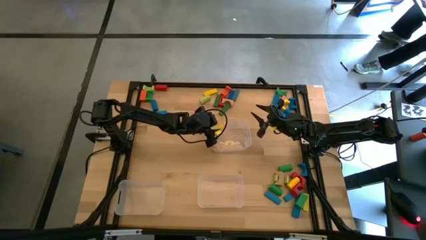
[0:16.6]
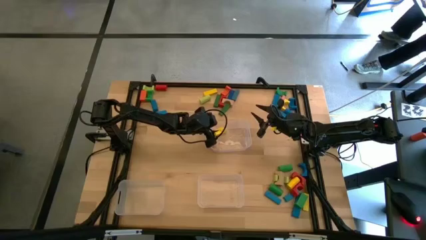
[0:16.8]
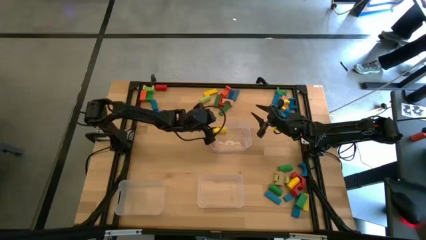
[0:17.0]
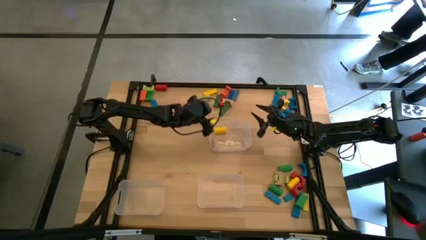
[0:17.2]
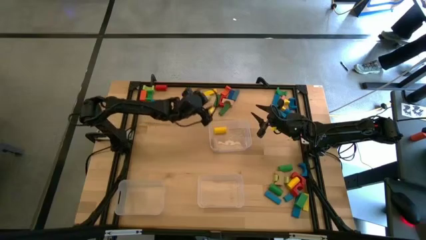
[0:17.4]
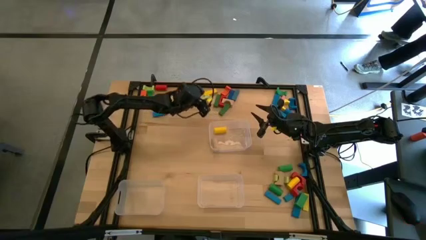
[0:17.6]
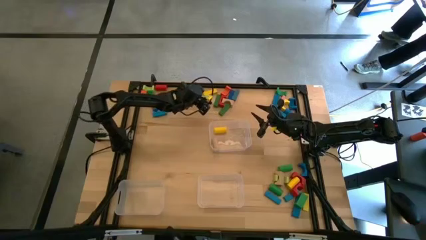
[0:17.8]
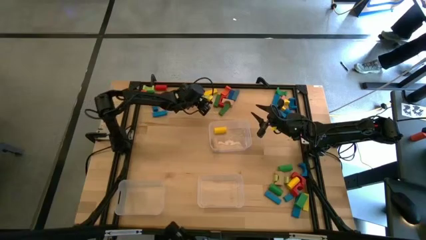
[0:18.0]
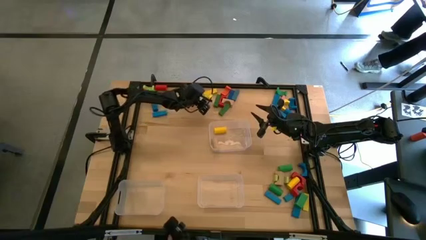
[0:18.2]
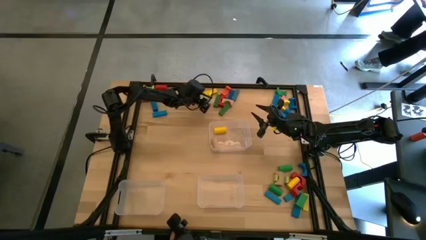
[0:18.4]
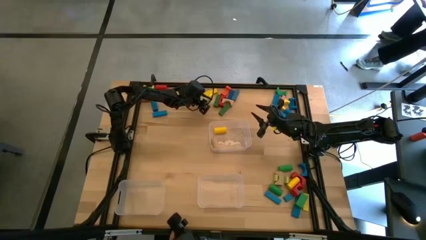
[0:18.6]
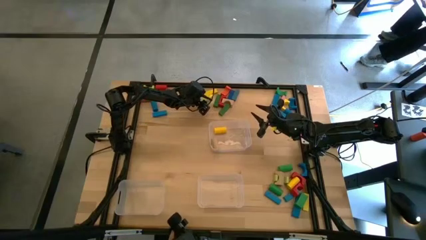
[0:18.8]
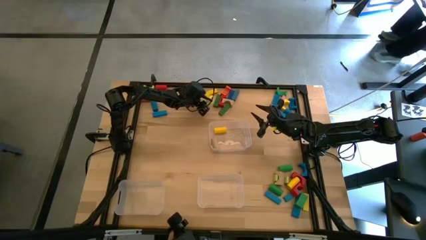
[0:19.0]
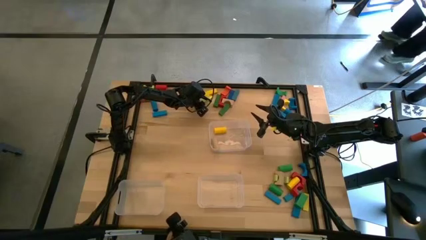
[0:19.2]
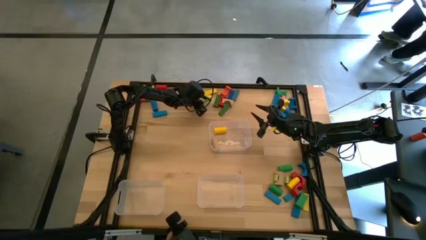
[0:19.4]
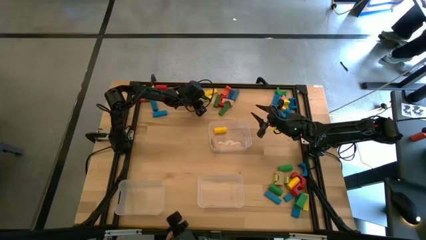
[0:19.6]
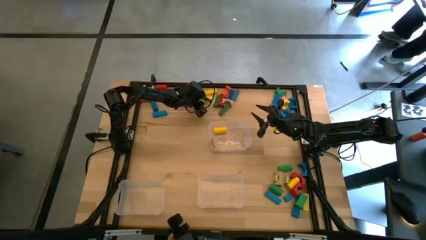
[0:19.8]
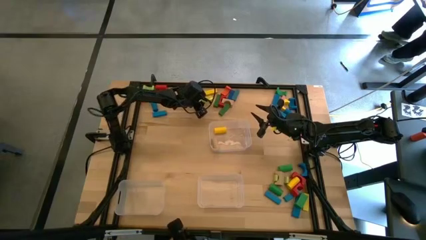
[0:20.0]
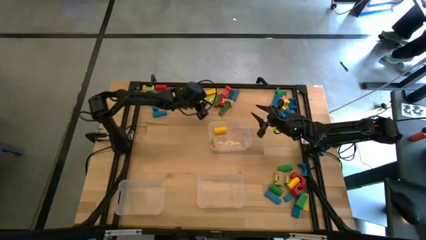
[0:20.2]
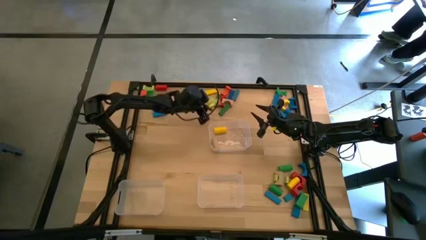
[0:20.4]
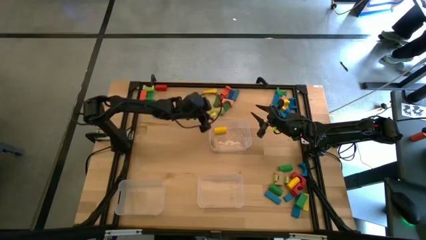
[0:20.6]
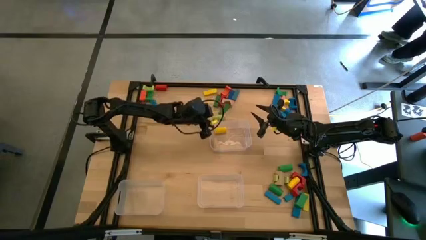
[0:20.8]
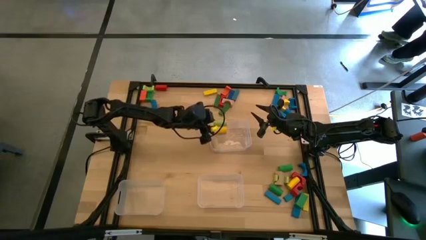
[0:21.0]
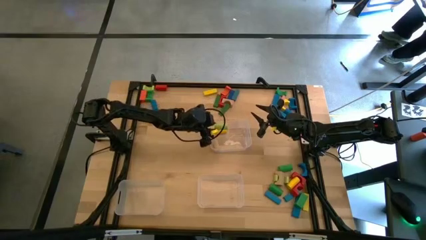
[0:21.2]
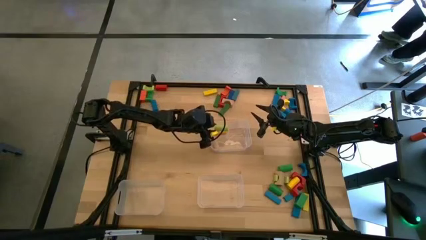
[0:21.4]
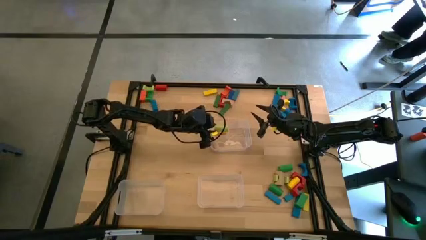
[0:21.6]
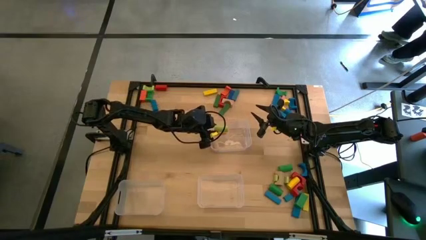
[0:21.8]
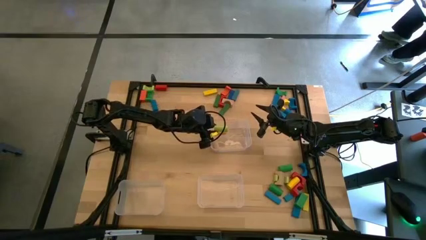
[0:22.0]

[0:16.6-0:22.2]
Task: Sort blocks by size
Put the light green cylindrical block into the top transparent bin

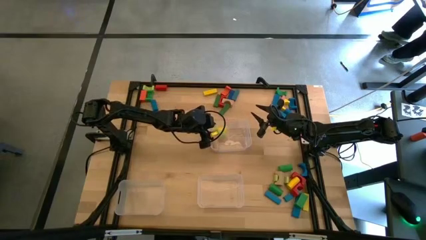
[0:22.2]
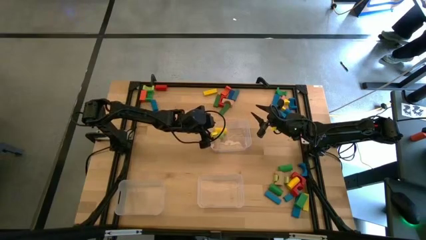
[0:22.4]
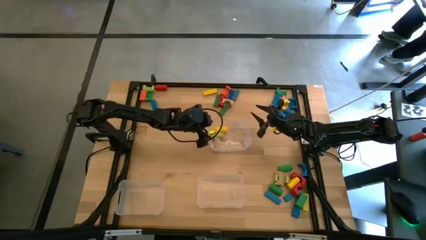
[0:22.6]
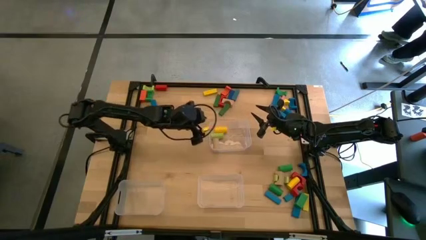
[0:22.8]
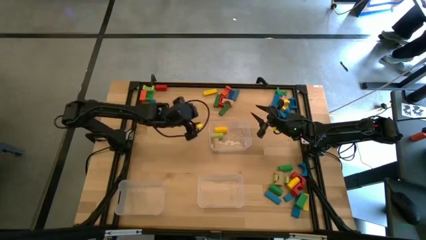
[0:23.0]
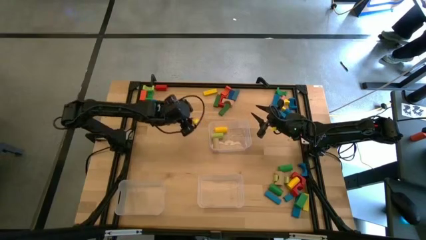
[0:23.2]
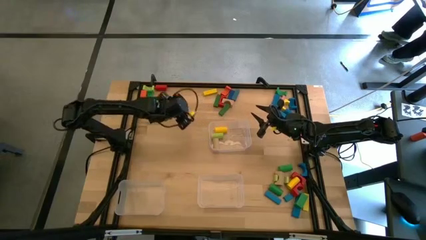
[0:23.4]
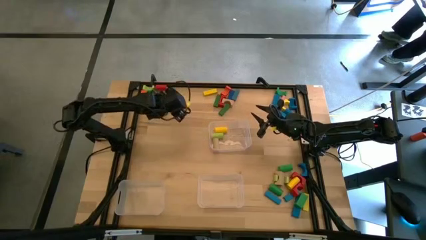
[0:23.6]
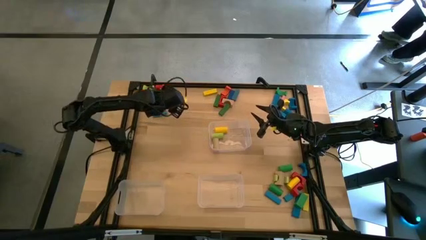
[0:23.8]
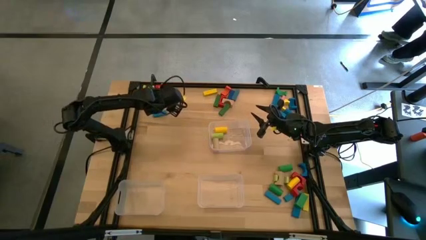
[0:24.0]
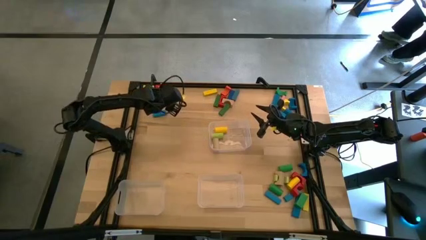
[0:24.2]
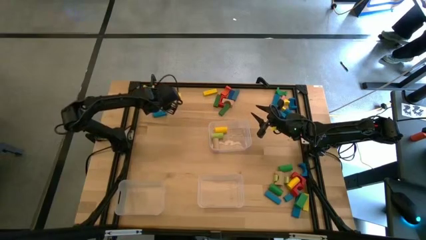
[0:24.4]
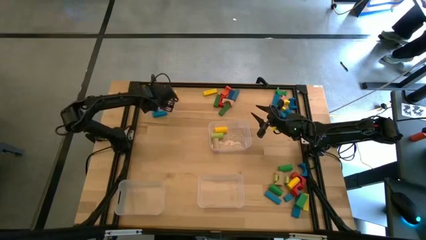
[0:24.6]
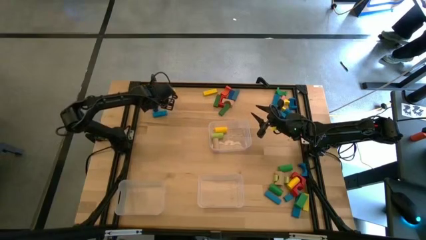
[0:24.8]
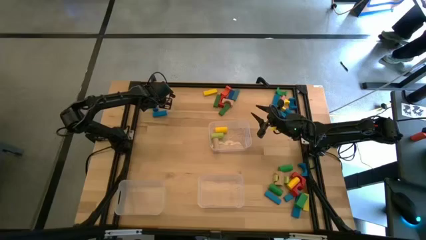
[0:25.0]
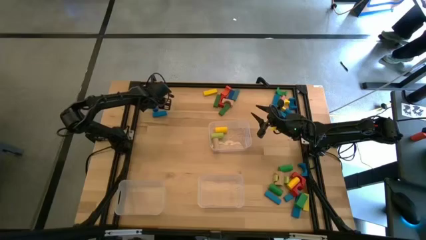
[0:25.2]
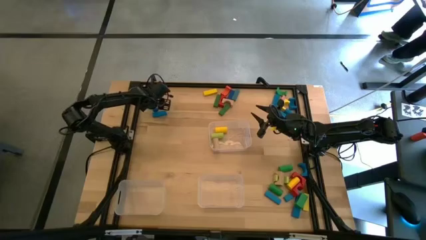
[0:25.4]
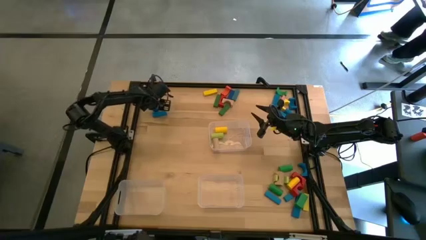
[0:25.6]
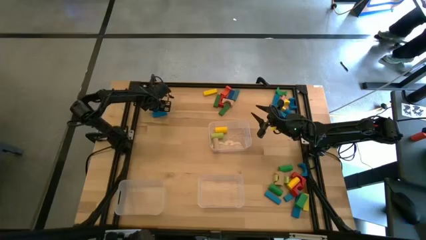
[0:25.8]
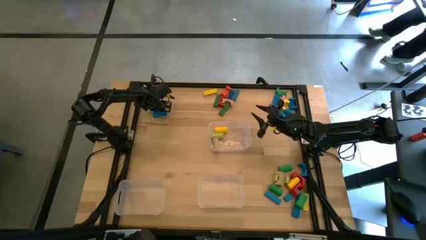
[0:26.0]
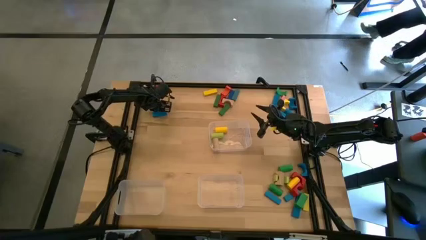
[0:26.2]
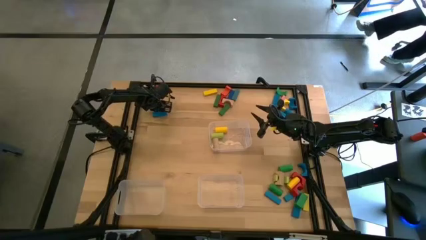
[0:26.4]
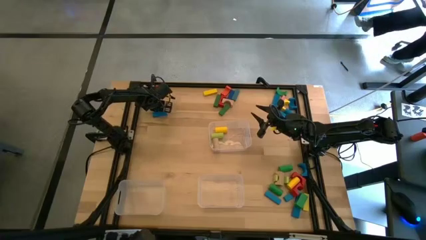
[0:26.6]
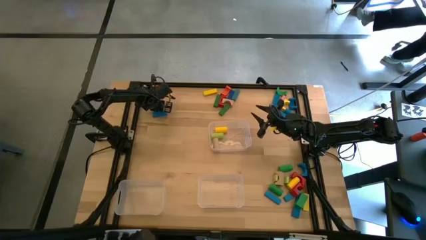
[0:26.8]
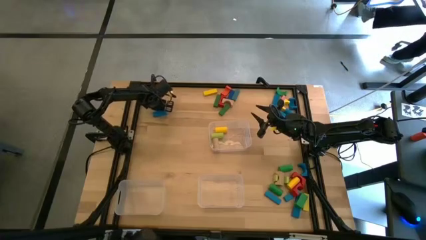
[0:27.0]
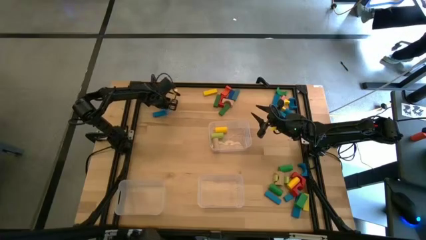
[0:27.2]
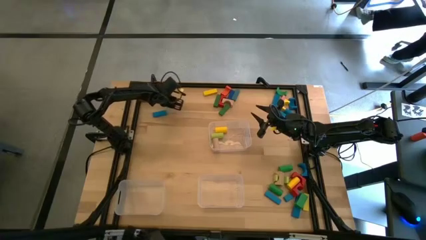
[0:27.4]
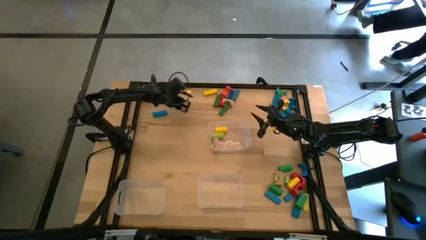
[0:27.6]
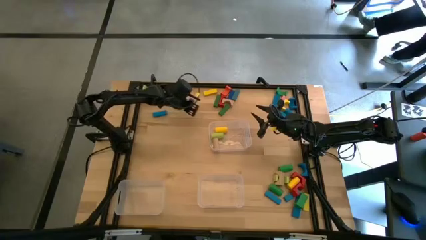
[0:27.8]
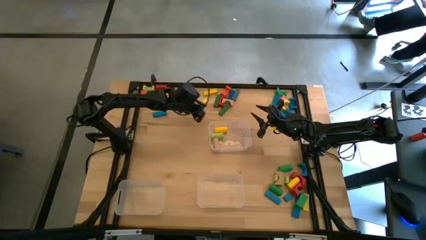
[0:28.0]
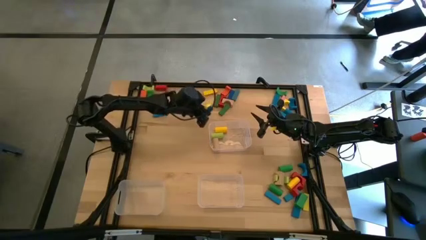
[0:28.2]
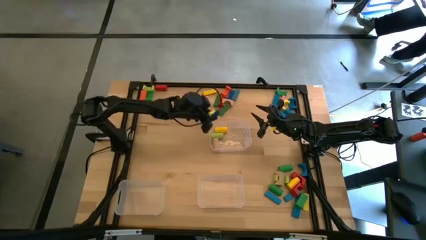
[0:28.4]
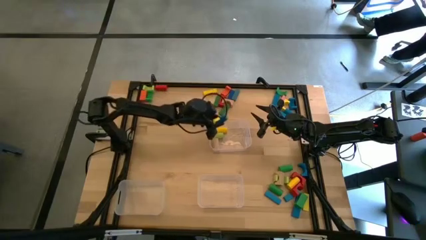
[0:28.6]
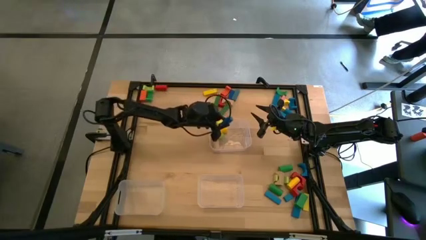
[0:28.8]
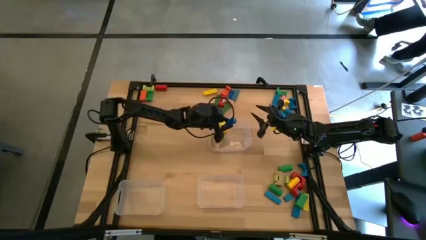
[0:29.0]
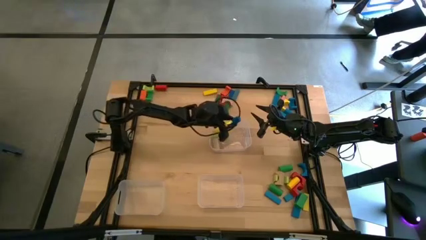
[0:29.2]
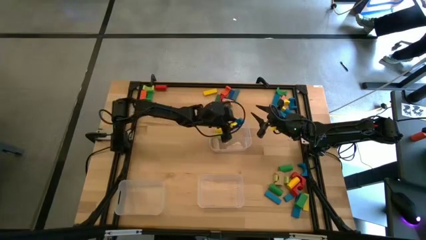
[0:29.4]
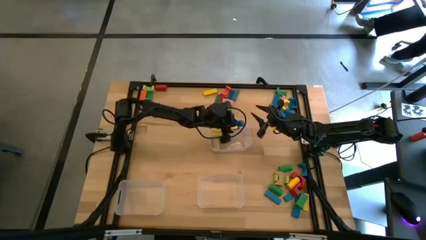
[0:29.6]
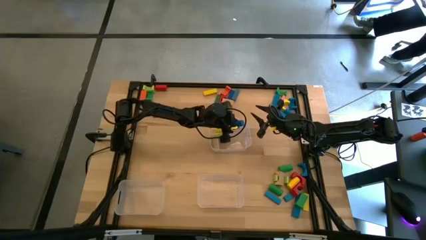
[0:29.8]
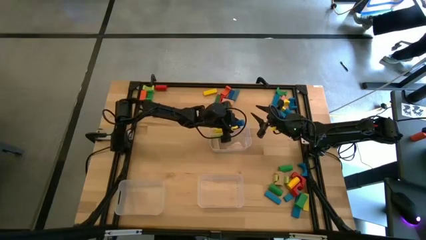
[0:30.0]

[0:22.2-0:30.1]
Put the blue cylindrical block into the top transparent bin

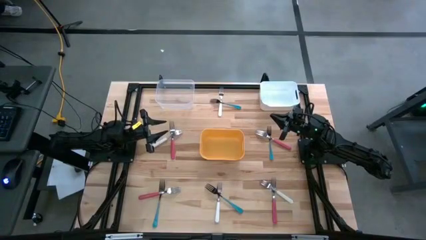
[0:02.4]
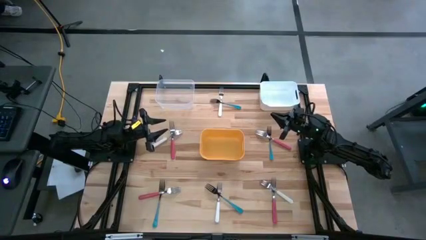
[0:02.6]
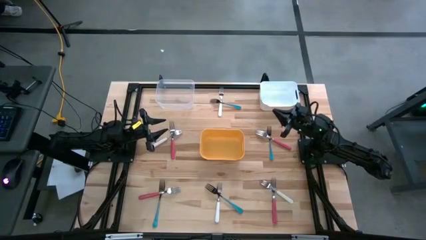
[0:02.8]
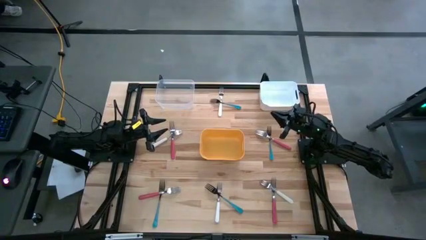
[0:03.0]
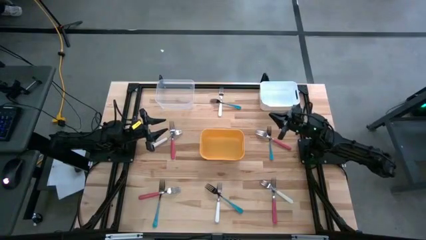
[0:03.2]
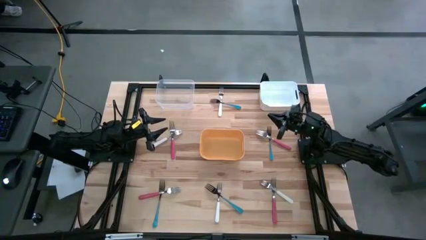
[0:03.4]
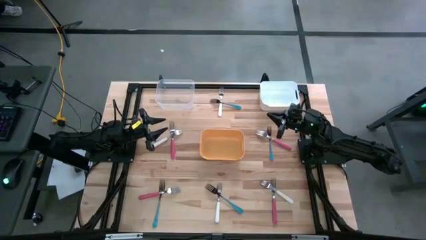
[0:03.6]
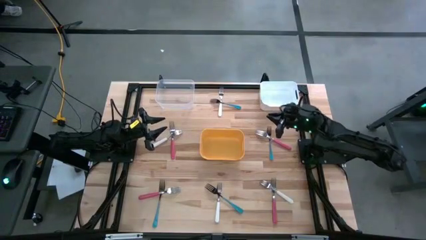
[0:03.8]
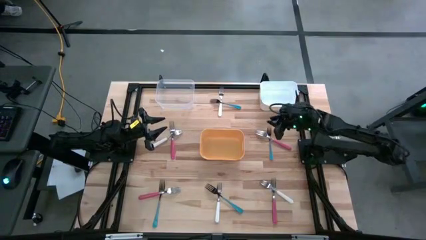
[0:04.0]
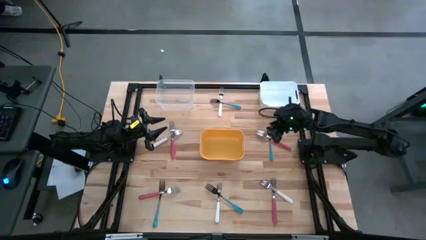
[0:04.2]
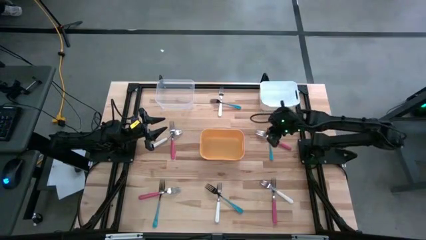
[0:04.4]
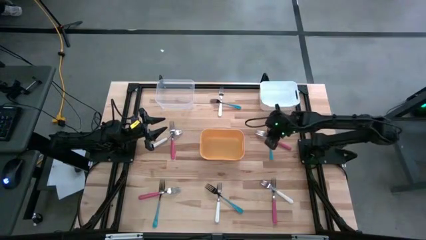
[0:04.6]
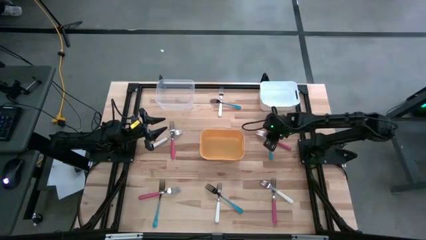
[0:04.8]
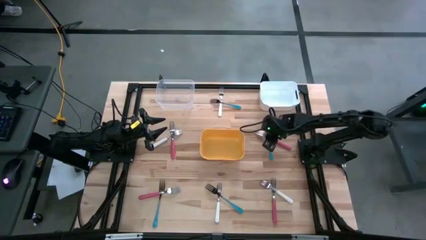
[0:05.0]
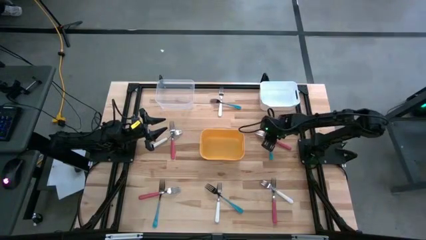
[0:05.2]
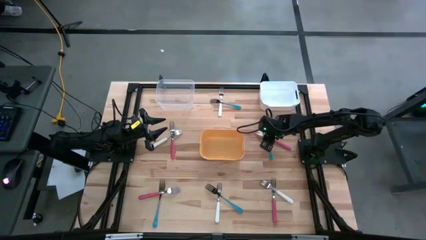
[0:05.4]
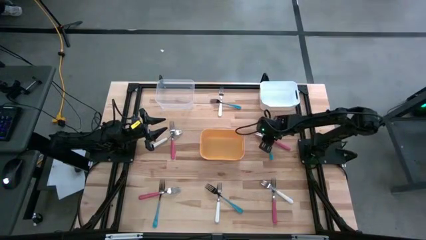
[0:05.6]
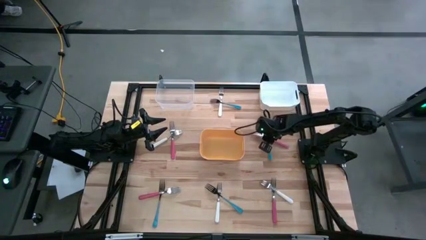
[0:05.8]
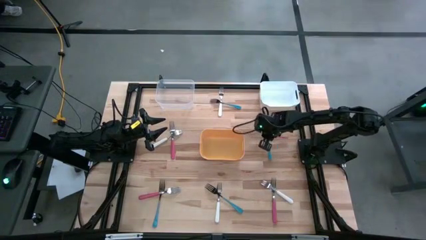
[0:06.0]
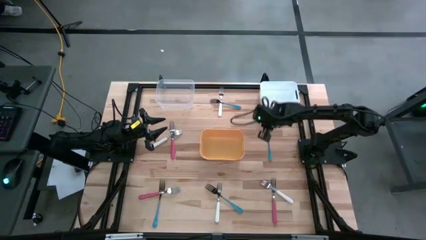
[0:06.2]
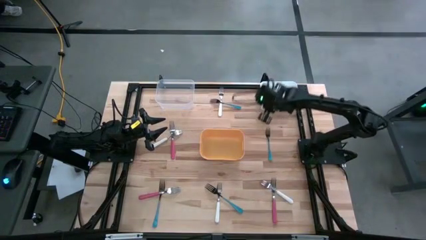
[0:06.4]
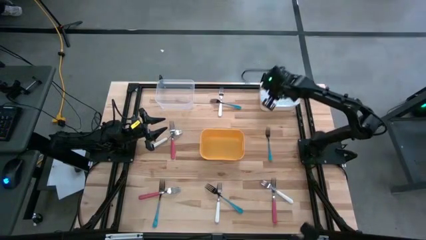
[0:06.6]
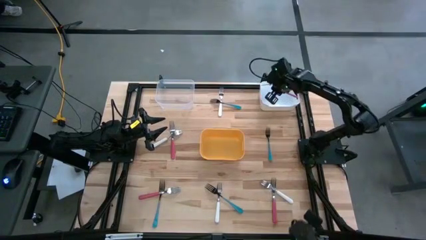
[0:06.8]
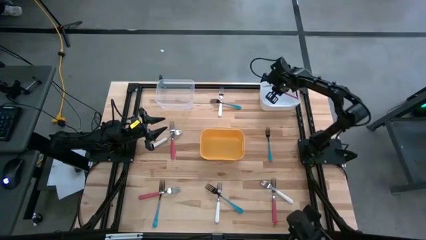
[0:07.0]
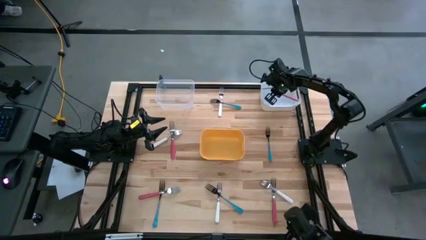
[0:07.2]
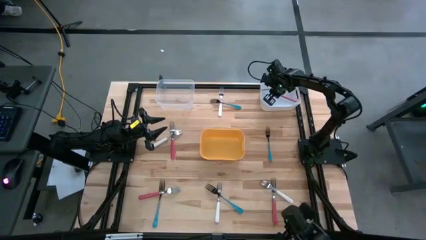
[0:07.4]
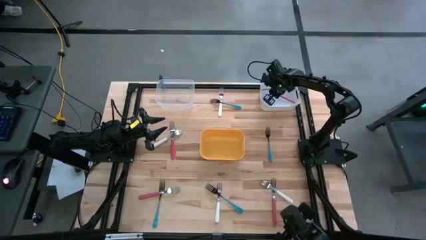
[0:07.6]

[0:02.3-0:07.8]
Task: Sort silverware by color (type)
Put the pink fork into the white bin
